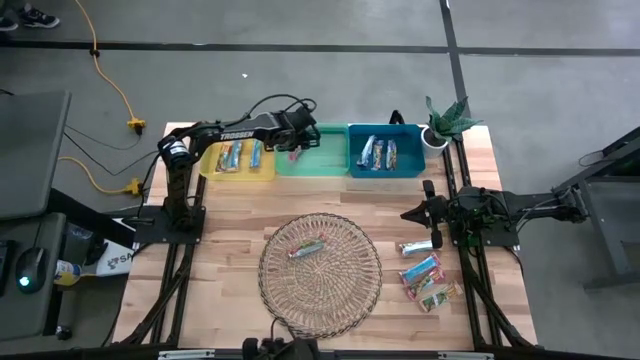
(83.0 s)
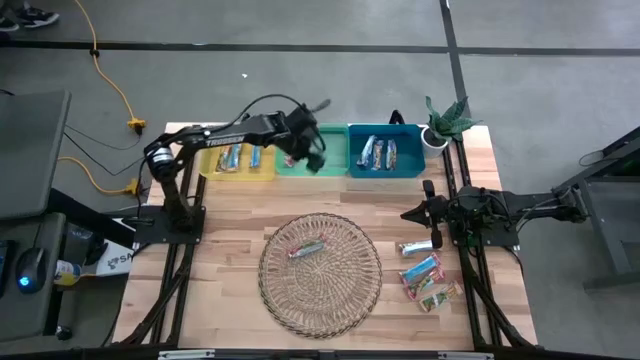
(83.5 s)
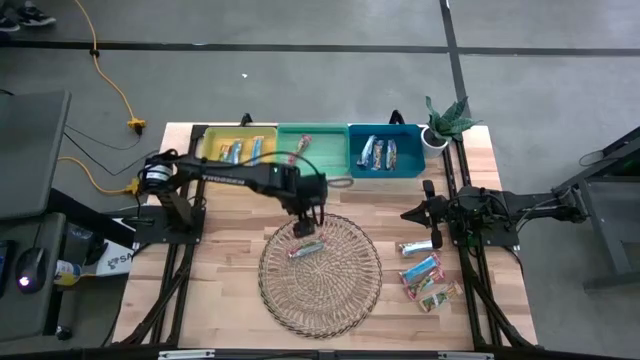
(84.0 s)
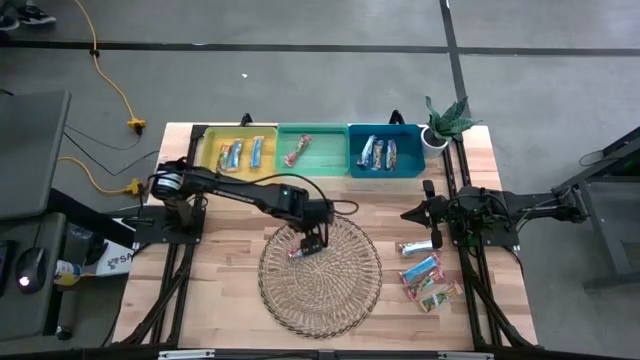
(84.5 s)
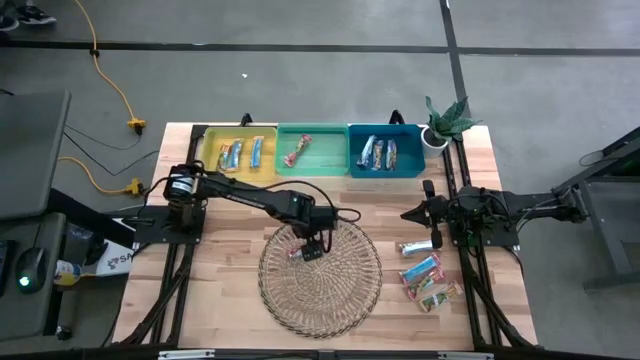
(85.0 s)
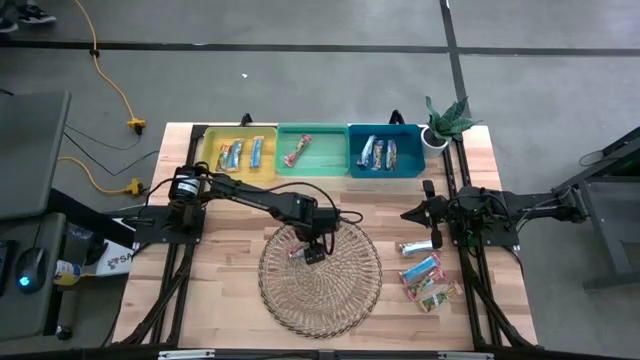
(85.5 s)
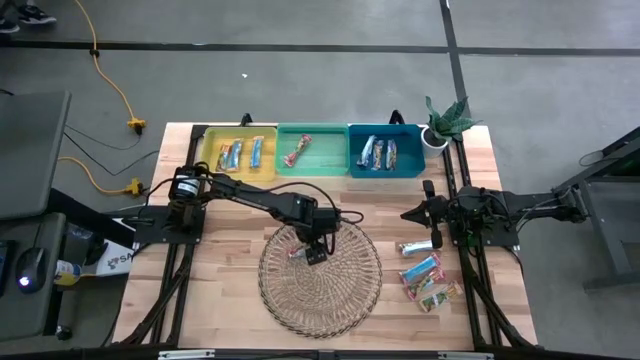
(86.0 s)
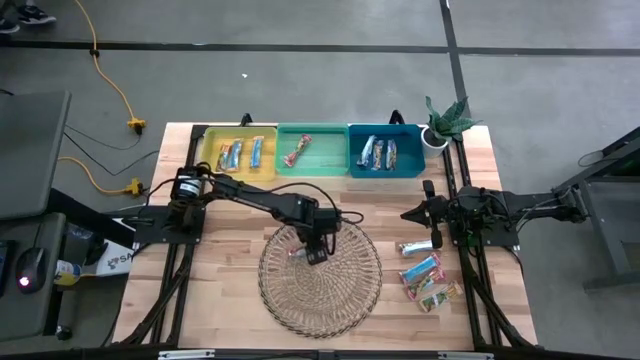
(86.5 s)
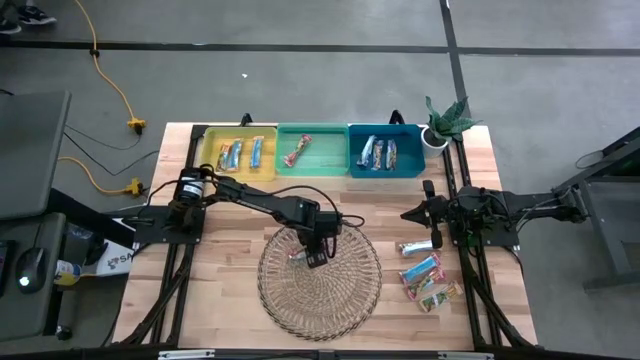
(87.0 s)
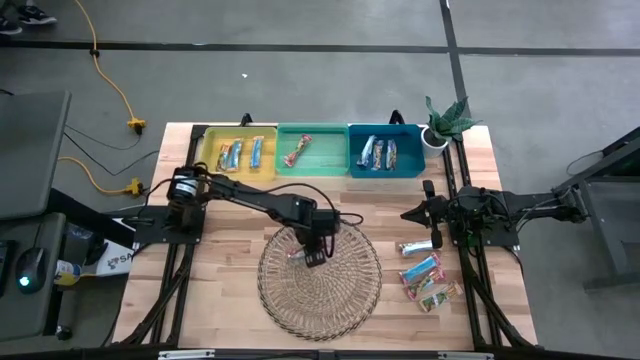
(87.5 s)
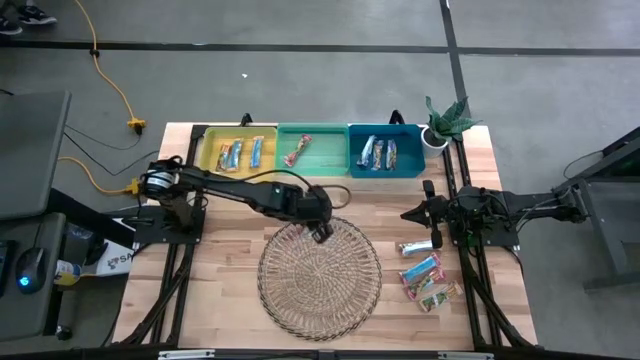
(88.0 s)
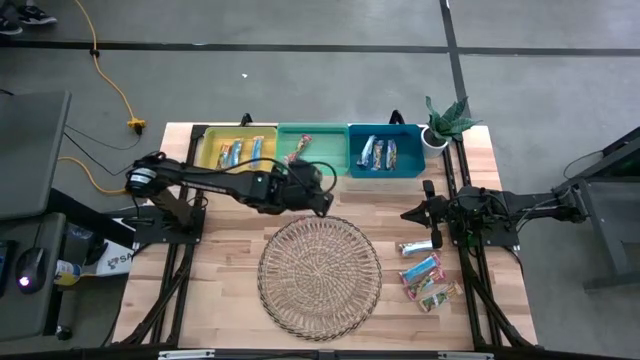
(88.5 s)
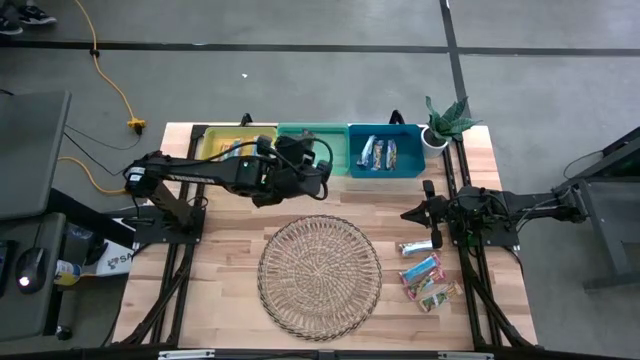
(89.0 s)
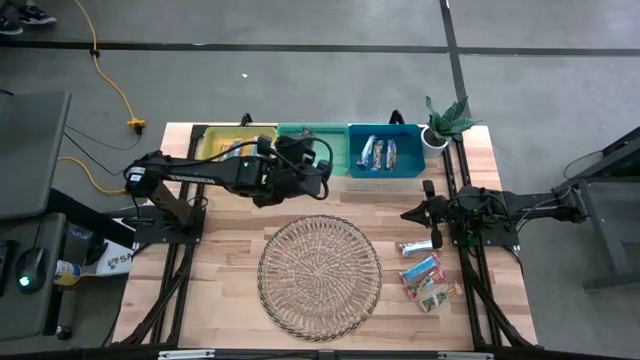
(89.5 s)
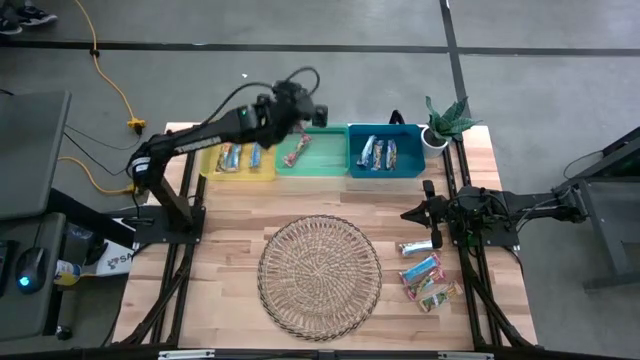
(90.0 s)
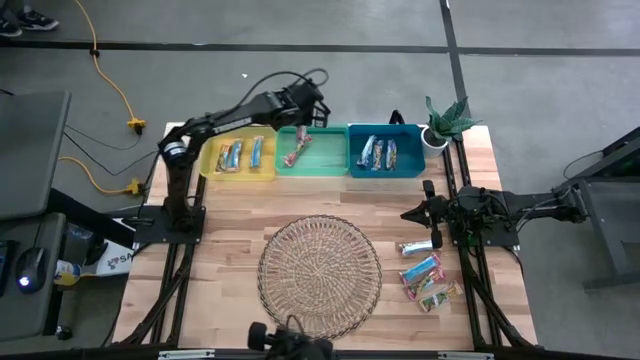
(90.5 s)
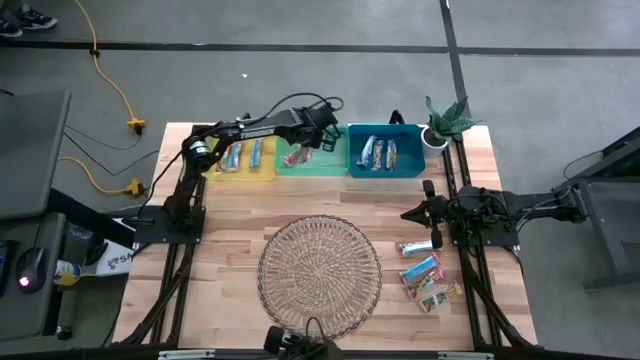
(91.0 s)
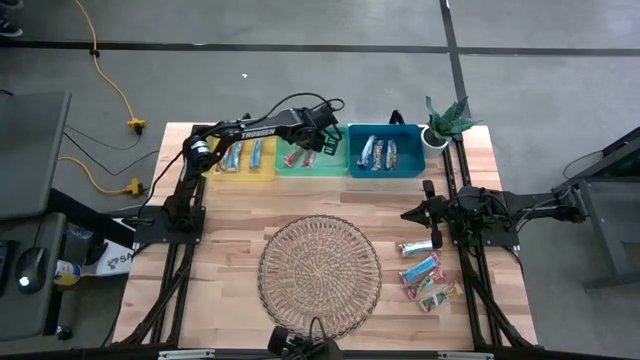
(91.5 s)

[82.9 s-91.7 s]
Task: Pick and place Granola Bars by type
Put the red granola bar into the green bin

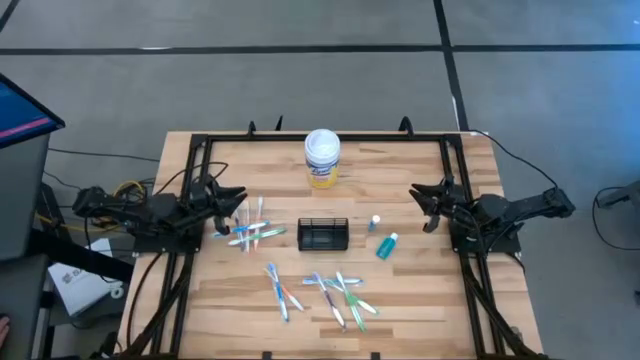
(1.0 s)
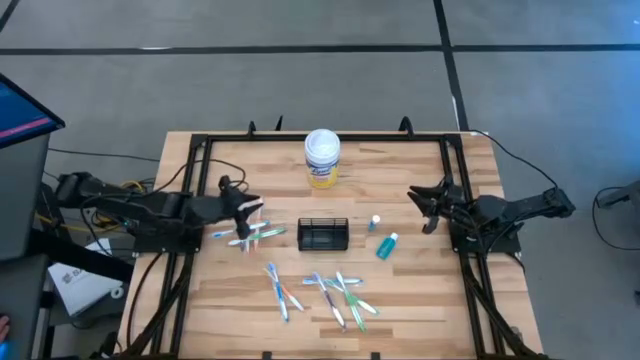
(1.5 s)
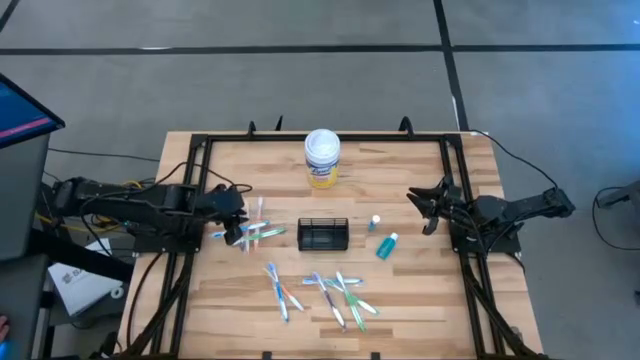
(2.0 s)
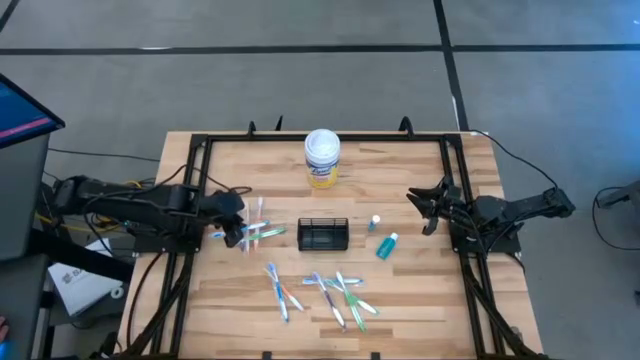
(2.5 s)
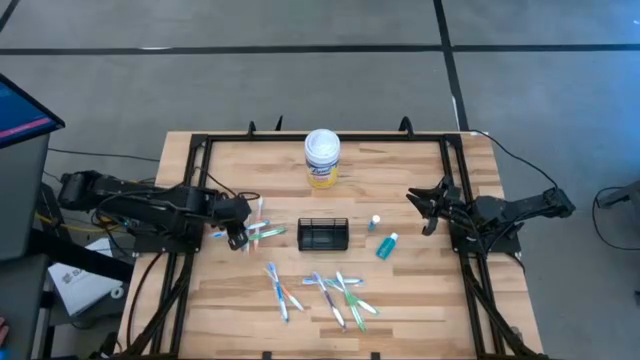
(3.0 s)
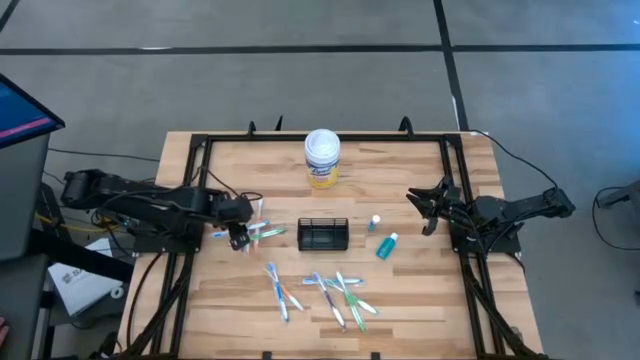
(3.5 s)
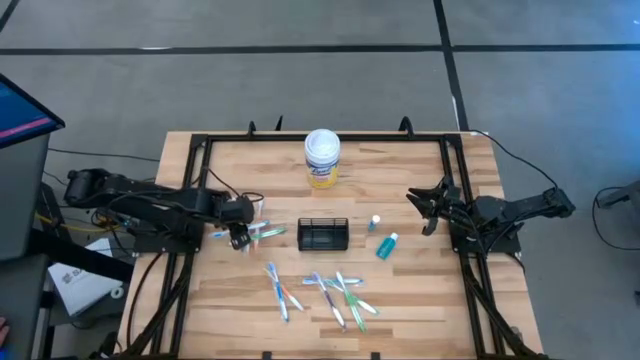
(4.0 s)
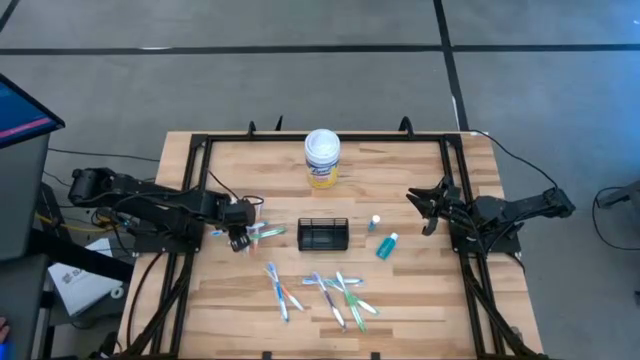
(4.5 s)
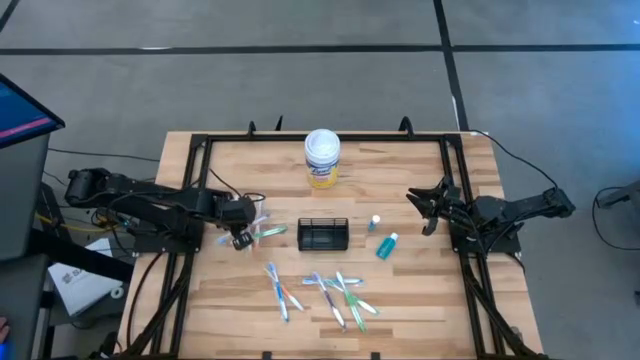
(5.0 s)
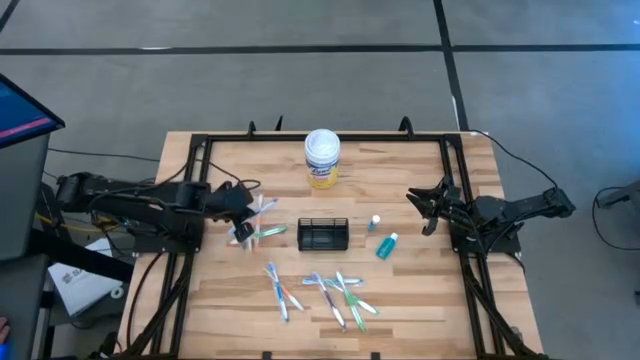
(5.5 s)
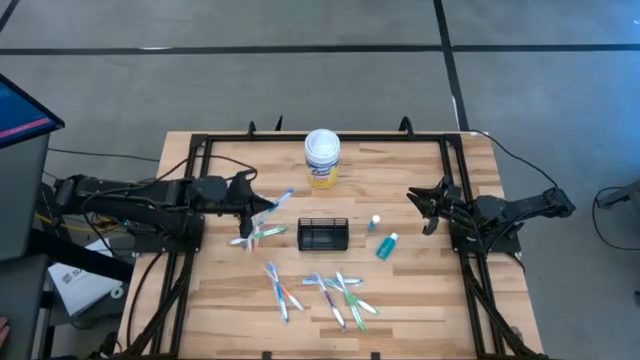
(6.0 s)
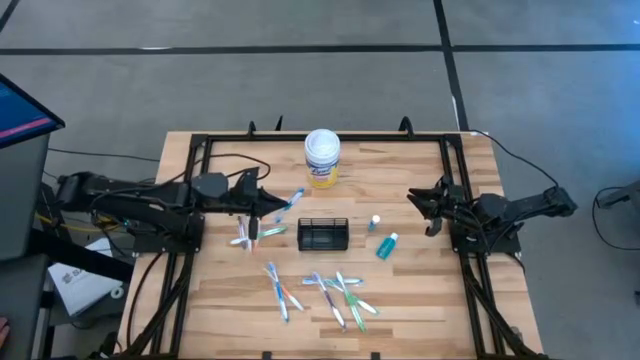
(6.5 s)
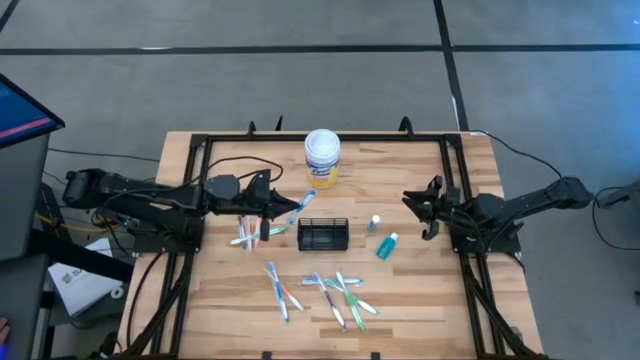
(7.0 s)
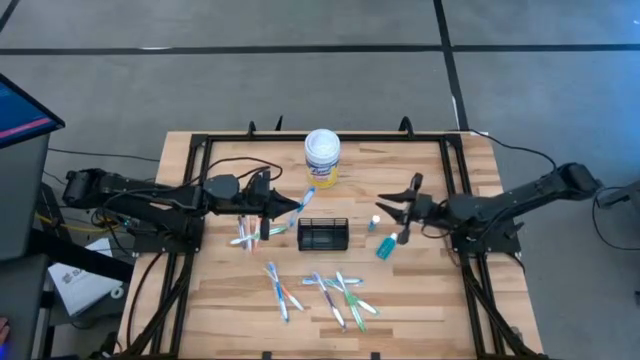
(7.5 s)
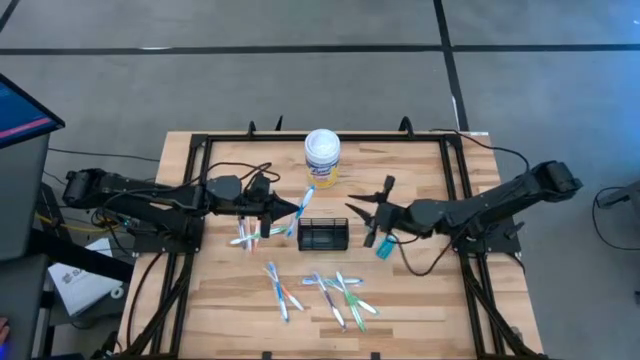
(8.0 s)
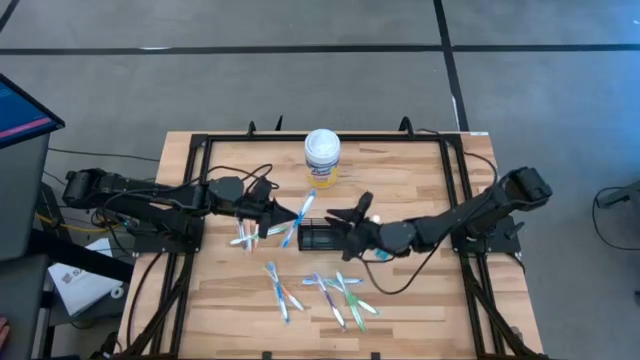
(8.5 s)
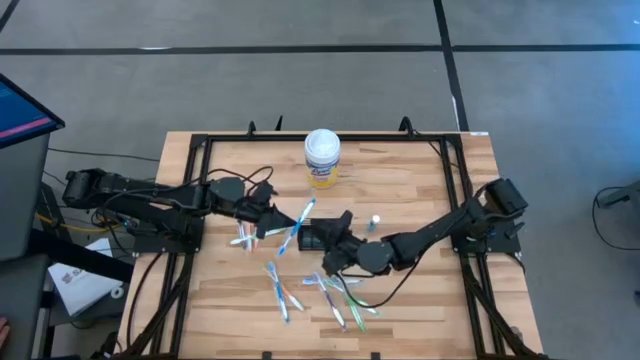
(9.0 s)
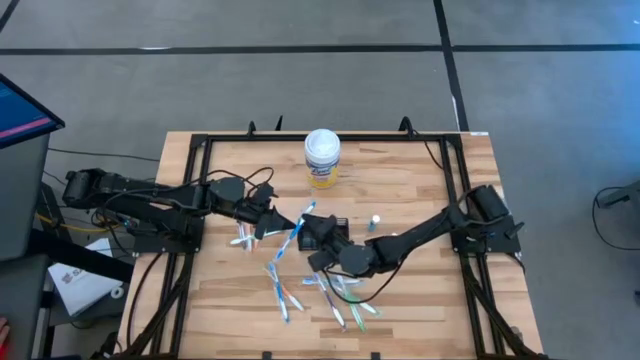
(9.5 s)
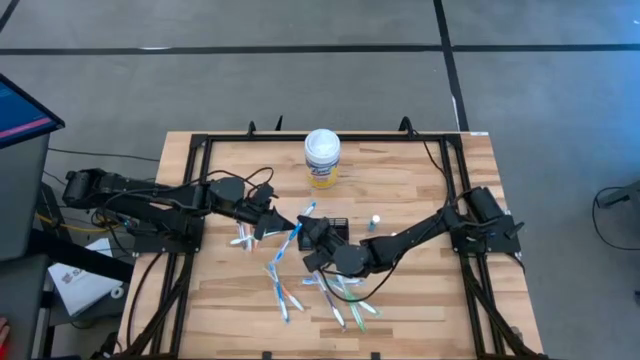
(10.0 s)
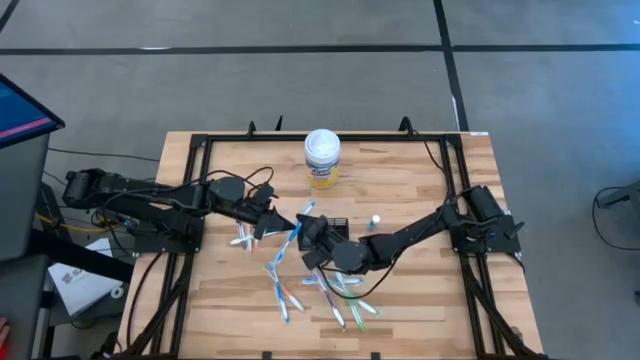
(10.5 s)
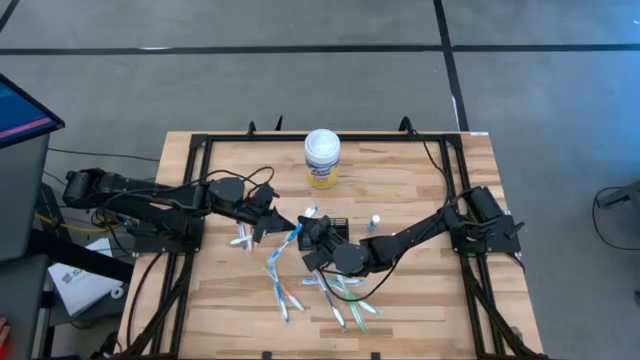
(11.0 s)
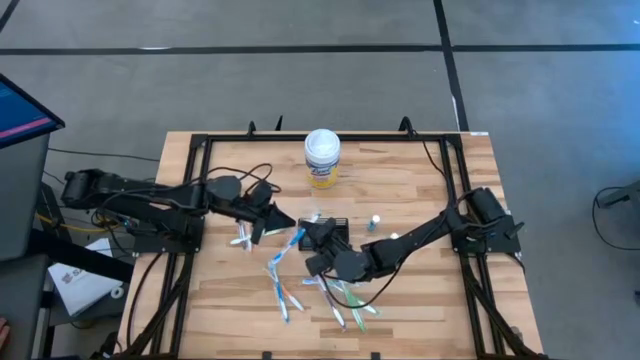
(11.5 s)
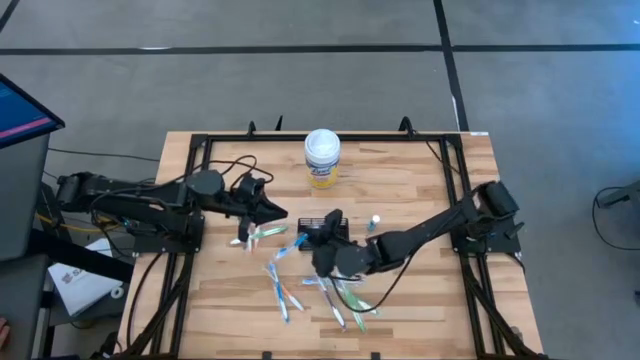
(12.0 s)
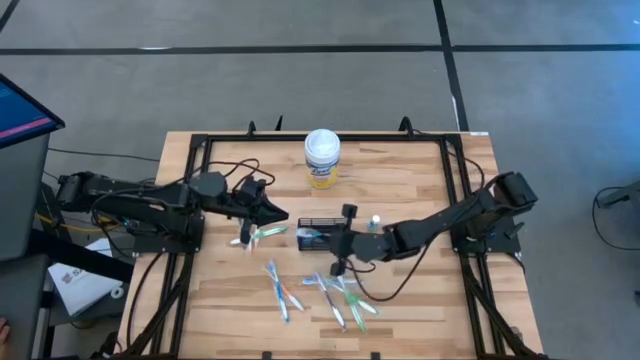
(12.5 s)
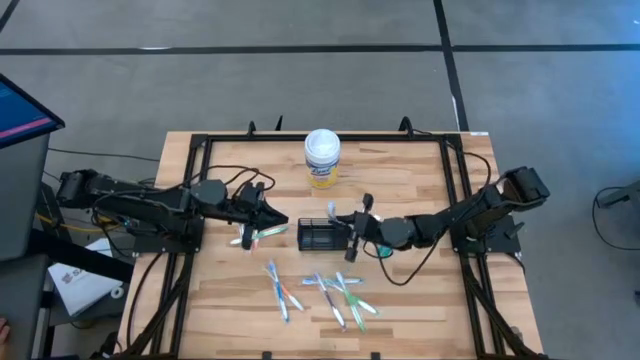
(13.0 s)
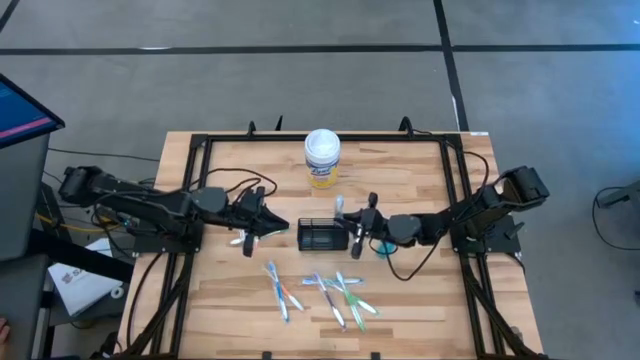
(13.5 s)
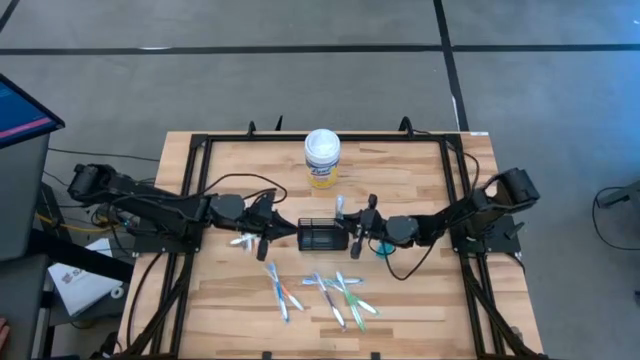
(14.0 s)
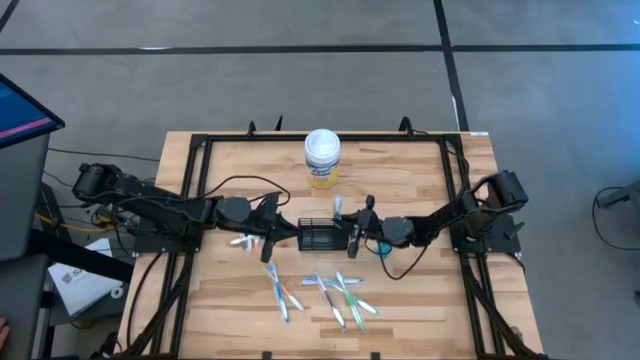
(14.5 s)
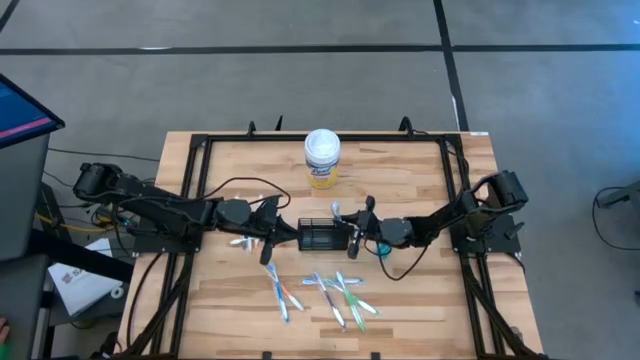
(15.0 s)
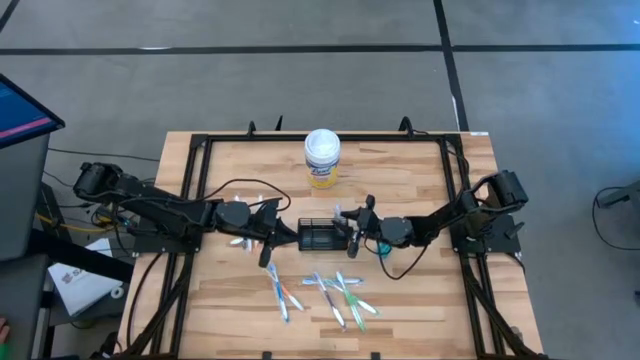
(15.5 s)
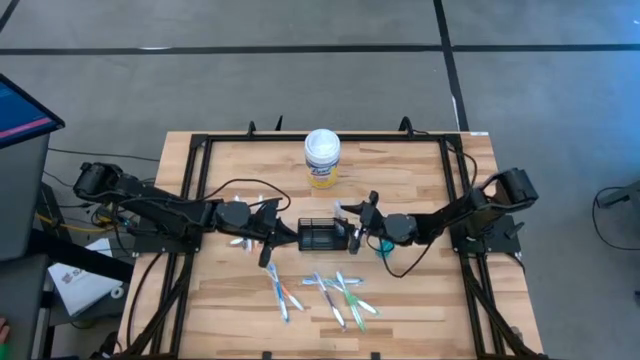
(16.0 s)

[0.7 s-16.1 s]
Task: Pick & Place toothbrushing station
Put the top blue toothbrush into the black mesh organizer
